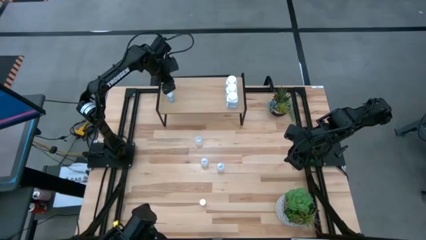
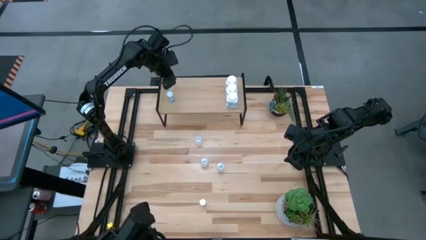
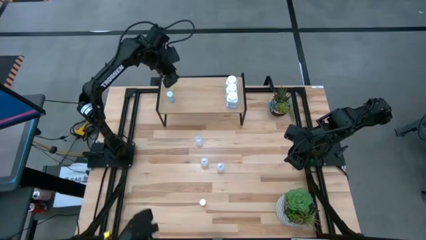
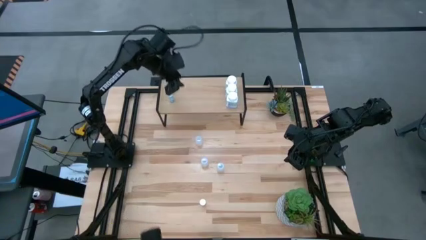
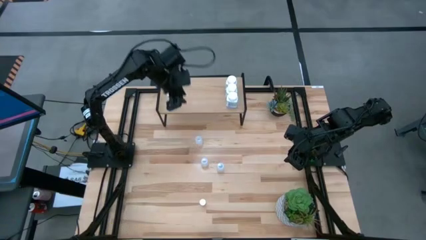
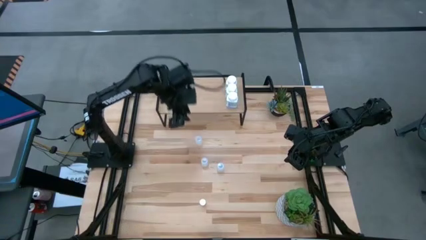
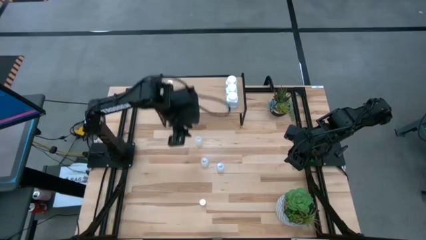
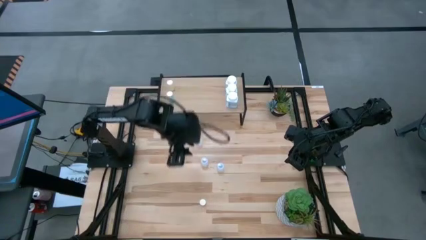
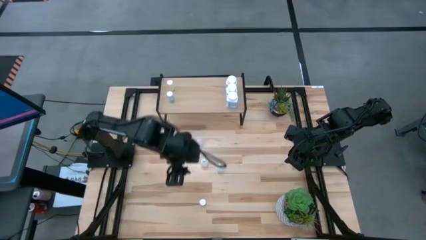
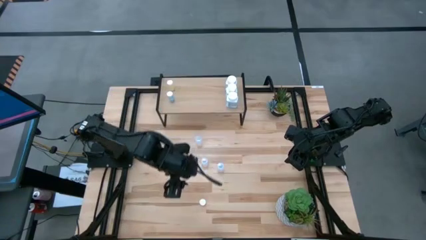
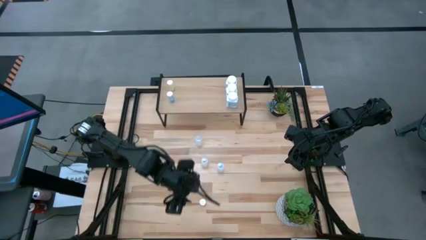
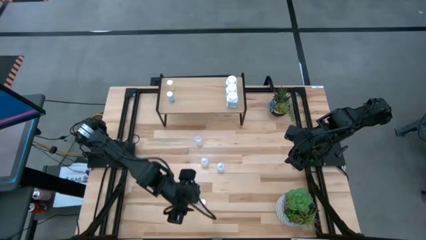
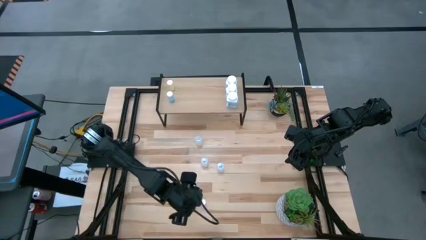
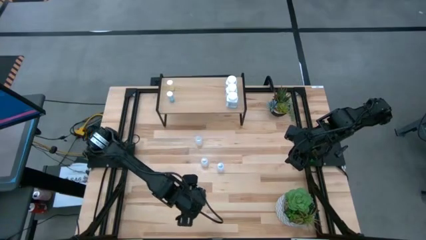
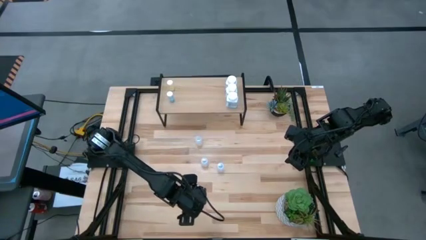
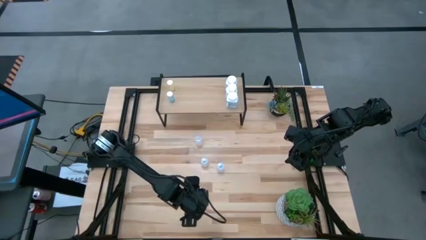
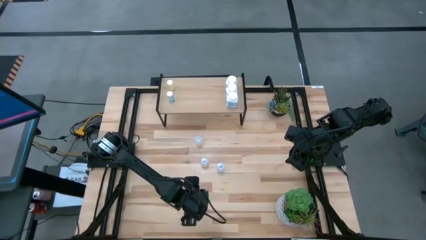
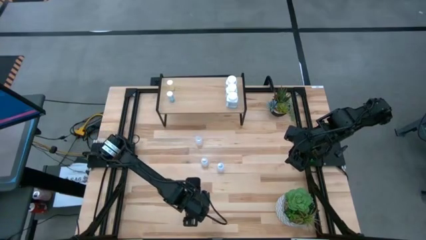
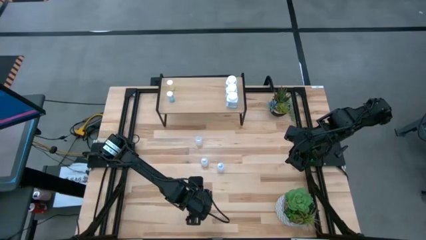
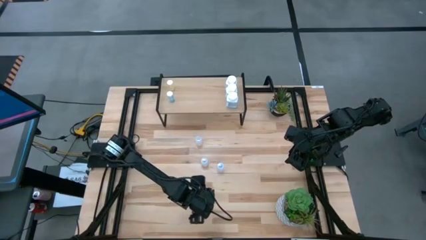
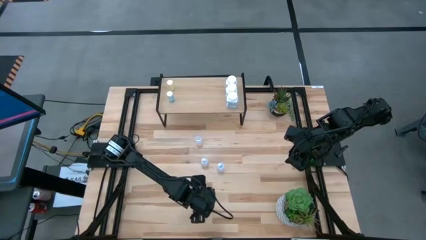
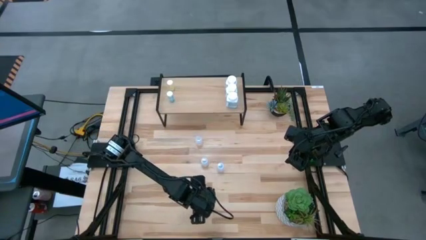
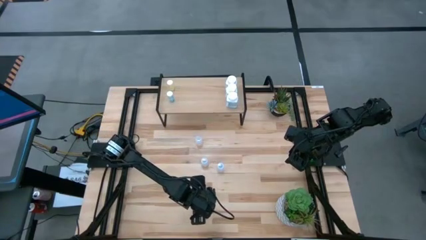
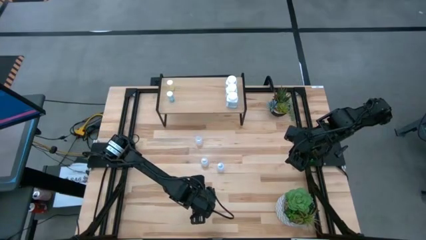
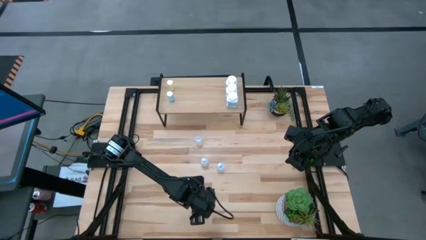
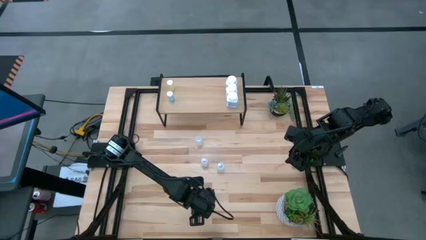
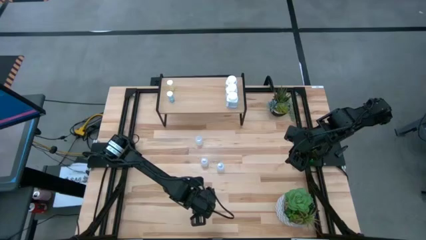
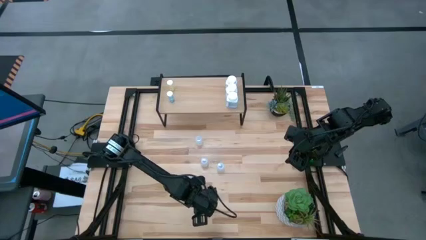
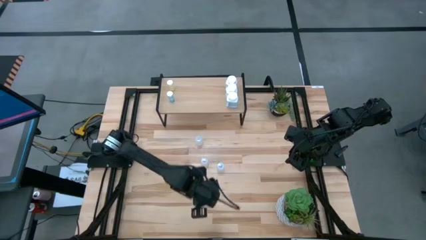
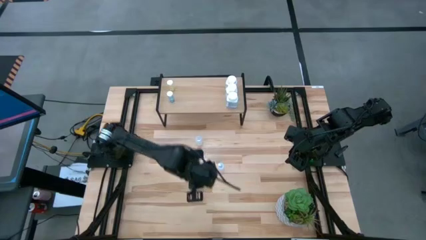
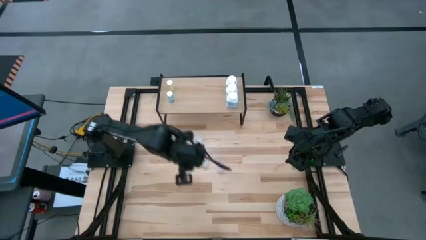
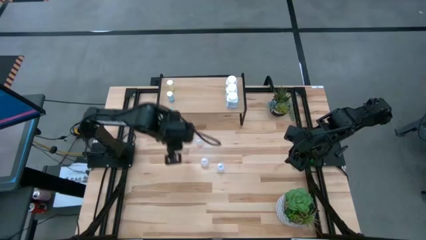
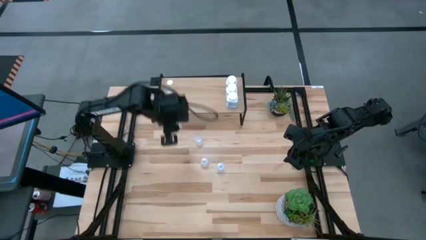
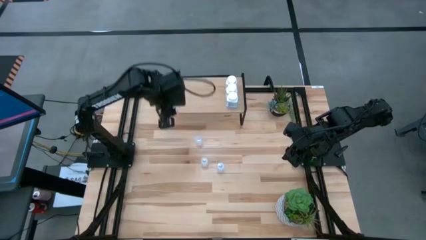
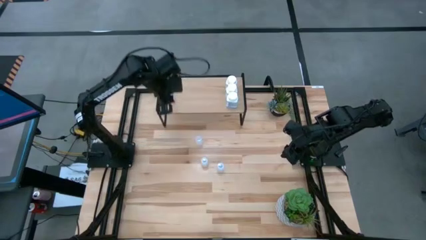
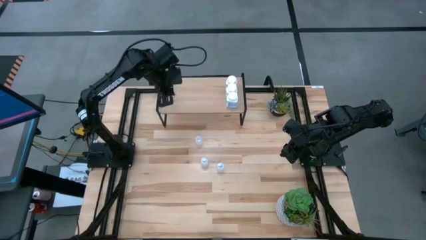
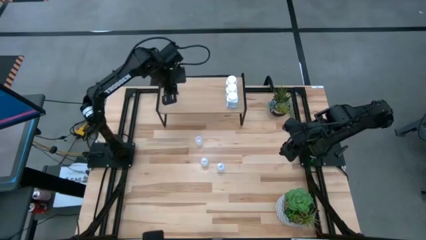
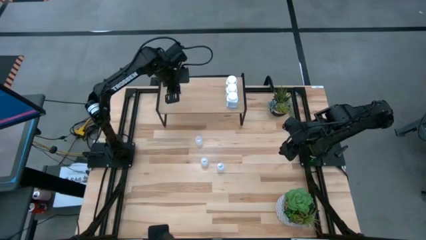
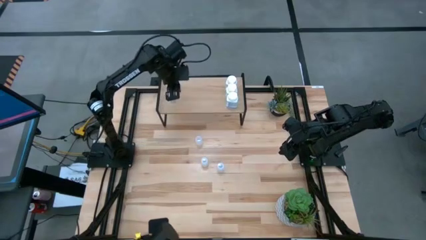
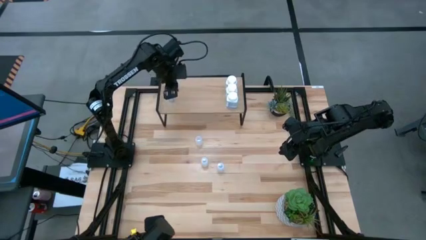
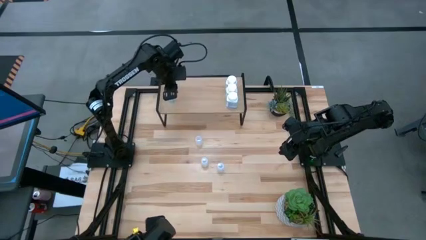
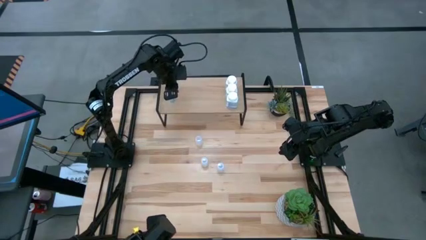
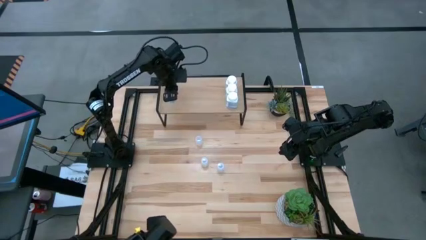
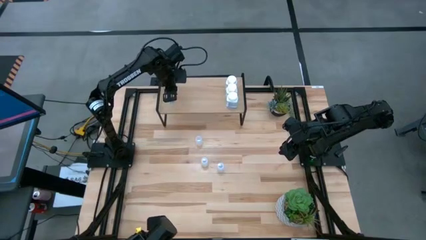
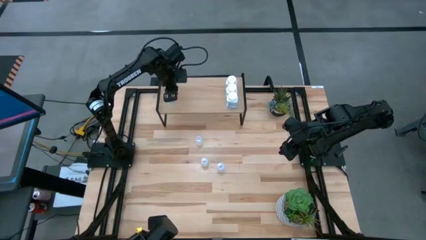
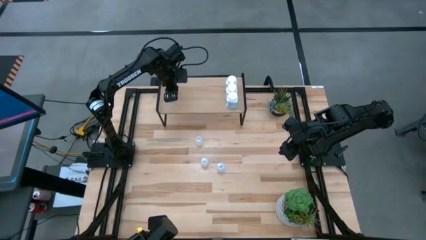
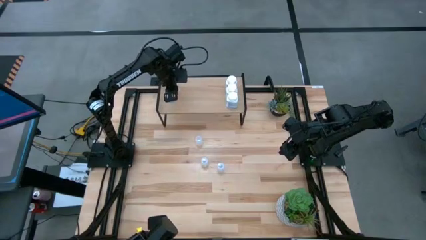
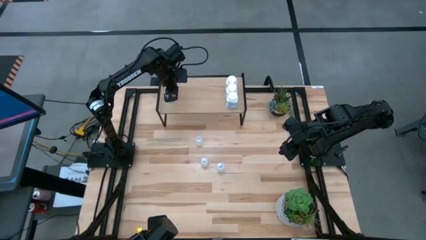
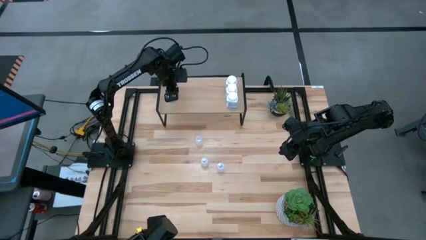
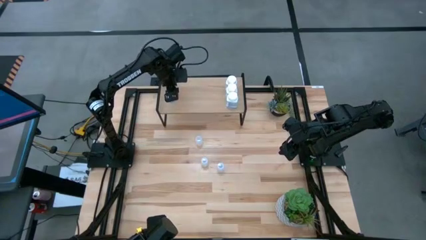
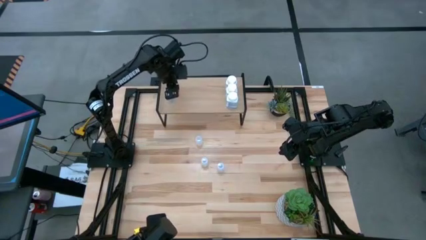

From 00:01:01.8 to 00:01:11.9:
Task: Pick and place medicine bottles onto shelf by color
Put the small pink pill bottle on the shelf

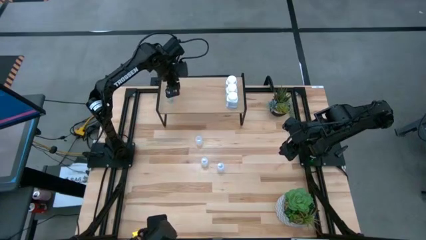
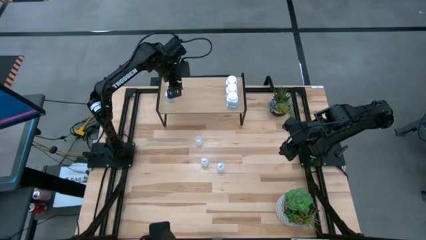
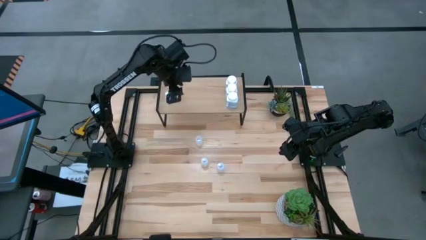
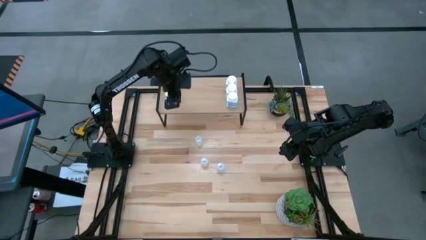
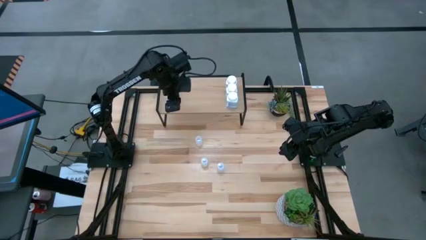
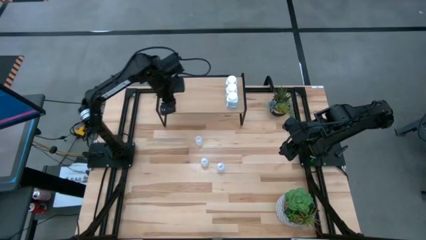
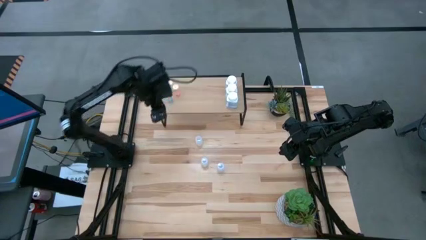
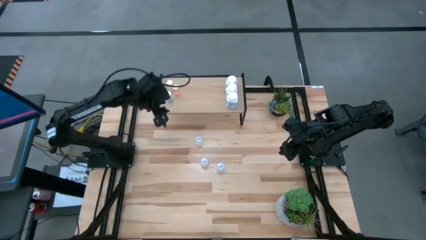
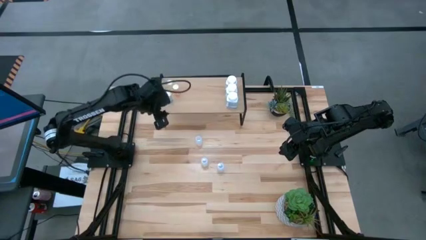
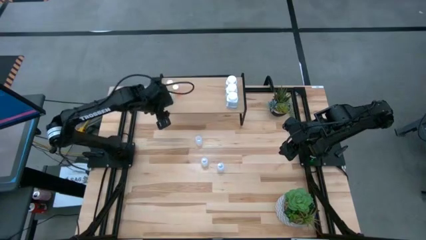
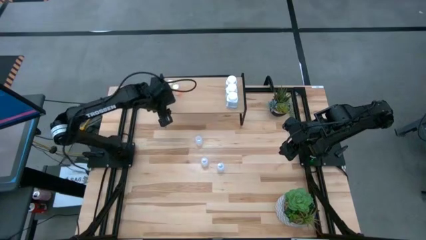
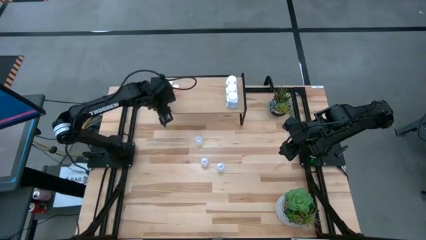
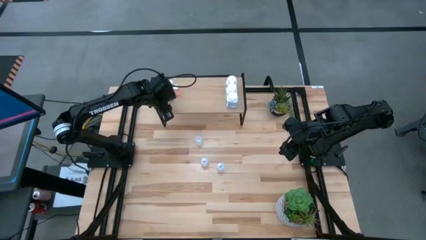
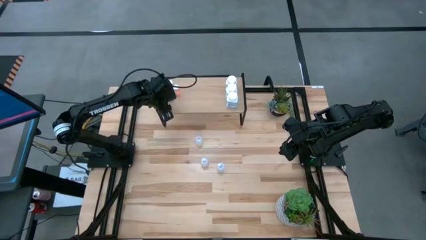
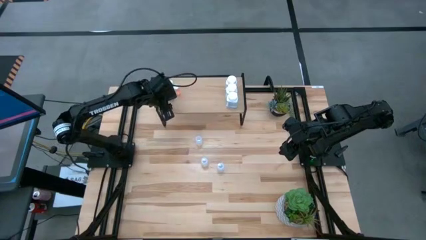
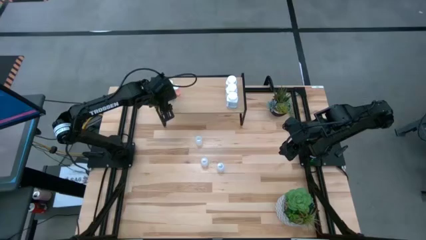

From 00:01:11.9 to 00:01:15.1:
Adjust the small blue pill bottle
